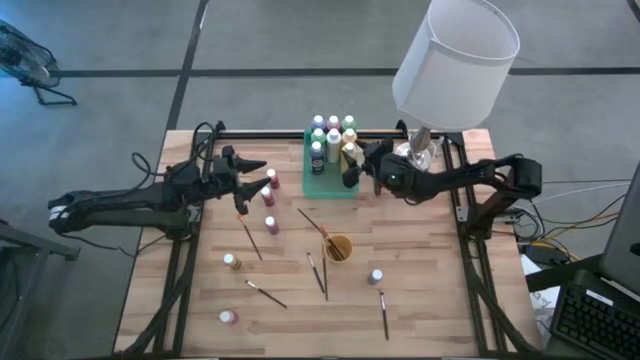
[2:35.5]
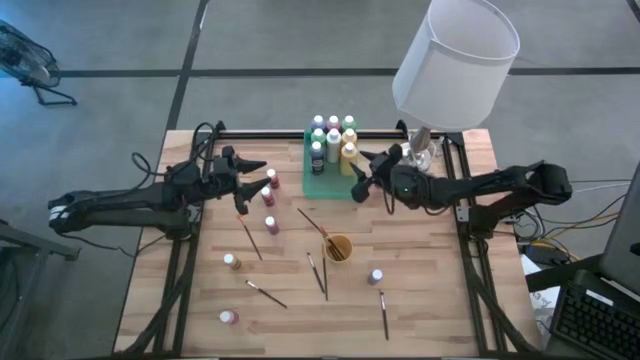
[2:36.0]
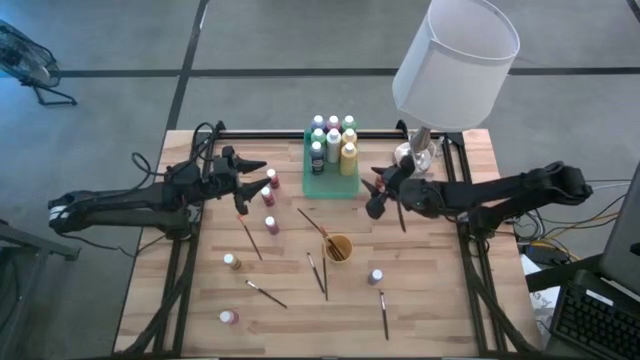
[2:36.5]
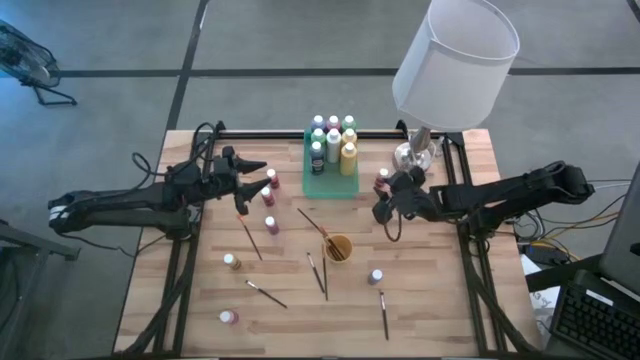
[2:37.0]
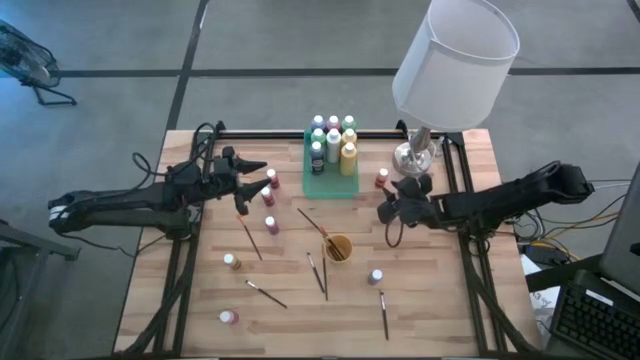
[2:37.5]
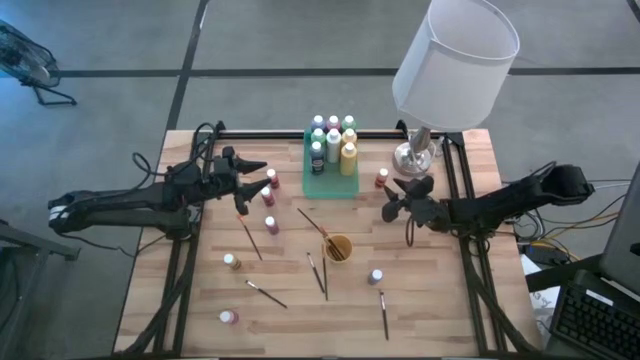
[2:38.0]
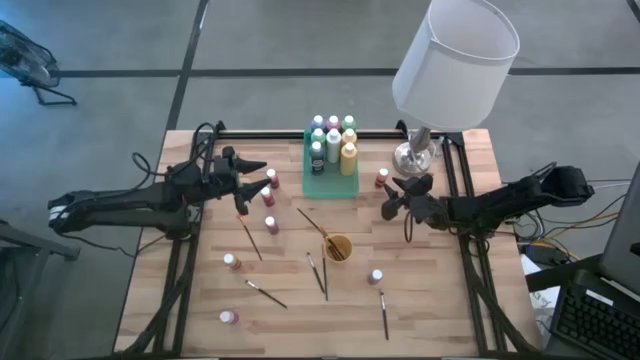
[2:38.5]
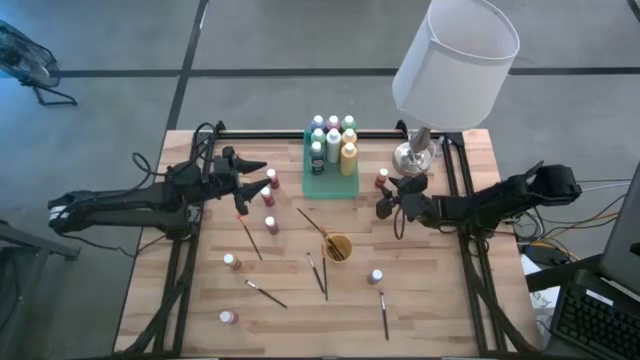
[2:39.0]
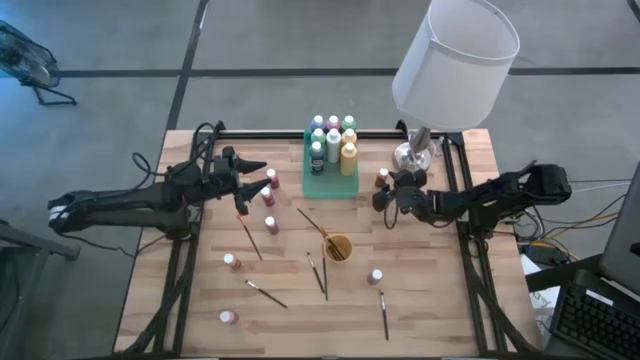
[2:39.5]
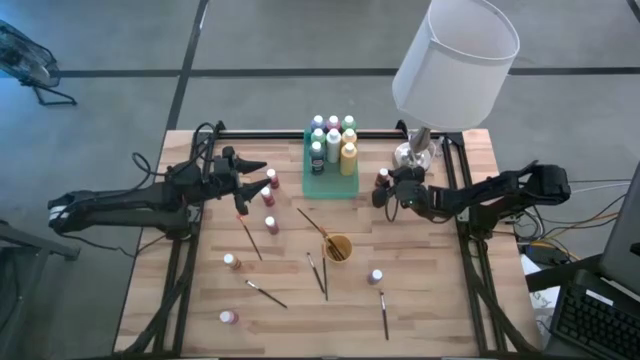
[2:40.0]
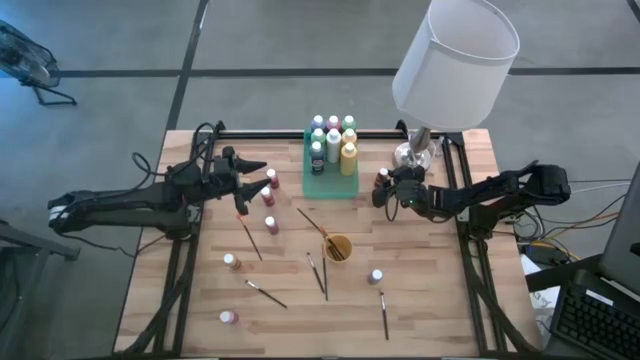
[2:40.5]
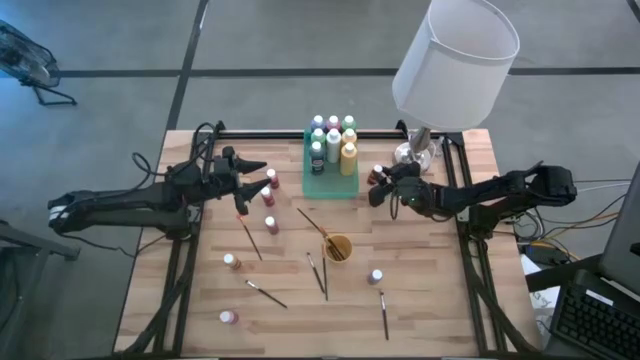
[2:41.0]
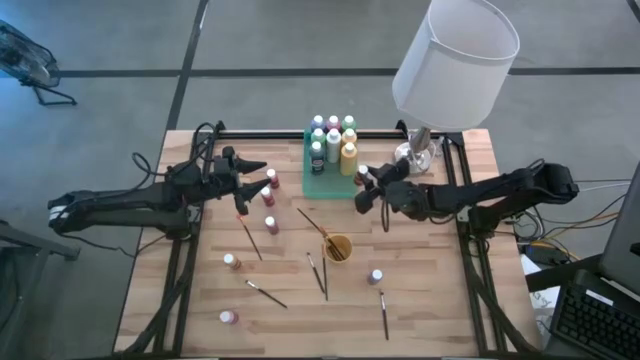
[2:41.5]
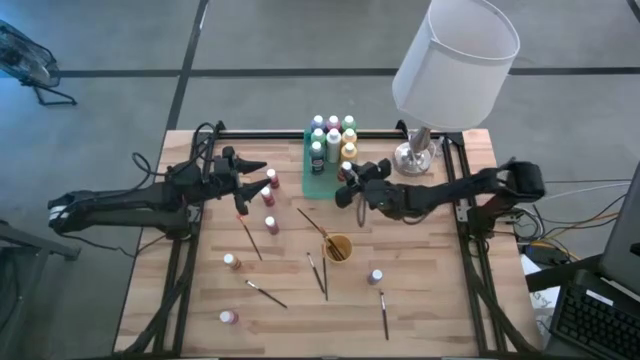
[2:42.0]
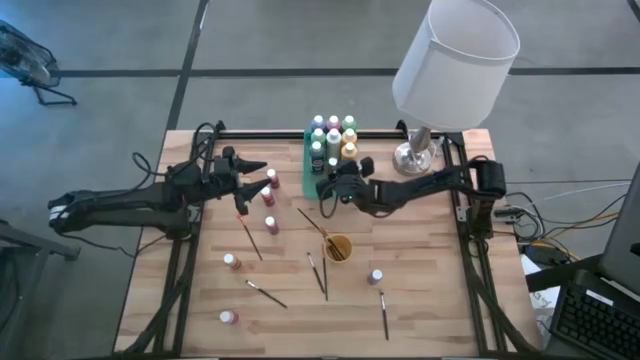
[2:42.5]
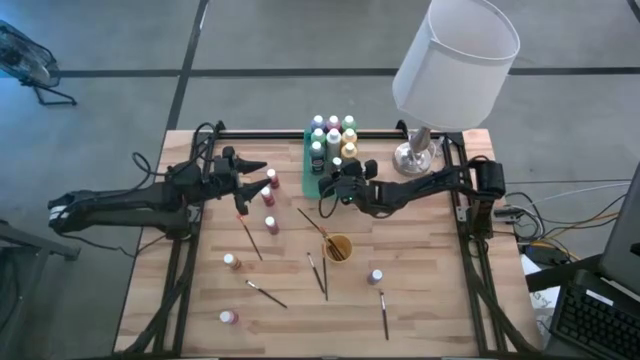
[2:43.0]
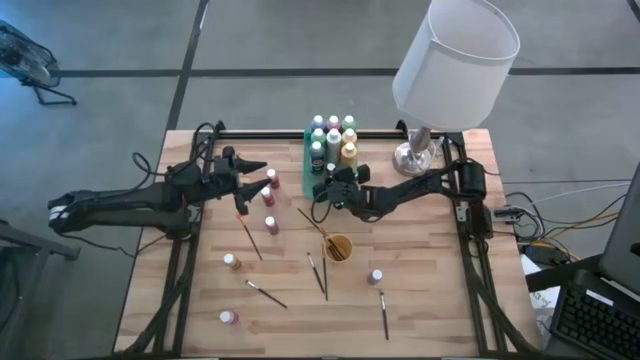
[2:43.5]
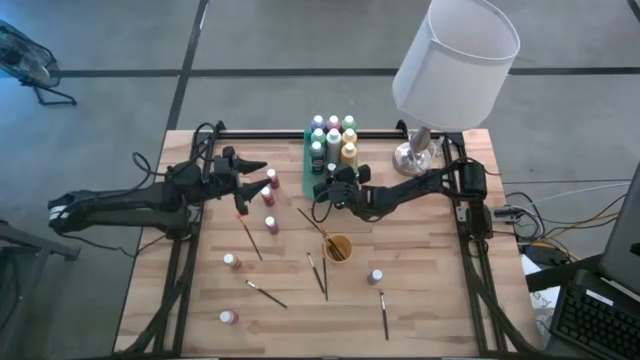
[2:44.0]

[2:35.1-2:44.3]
Task: Pick & Place Paint Supplies
Put the orange paint bottle into the green bin

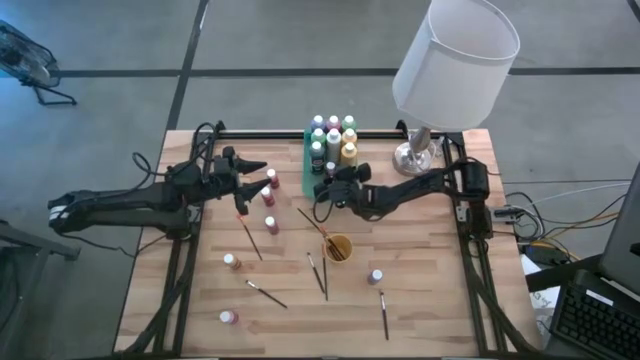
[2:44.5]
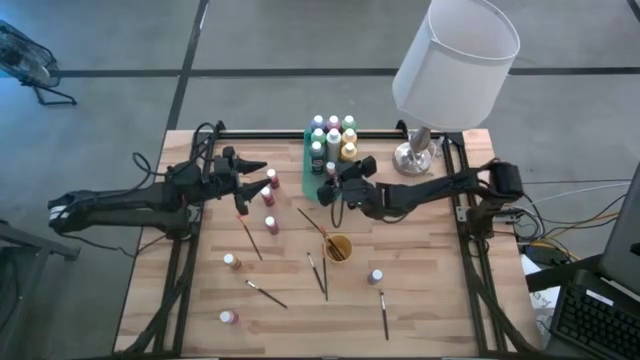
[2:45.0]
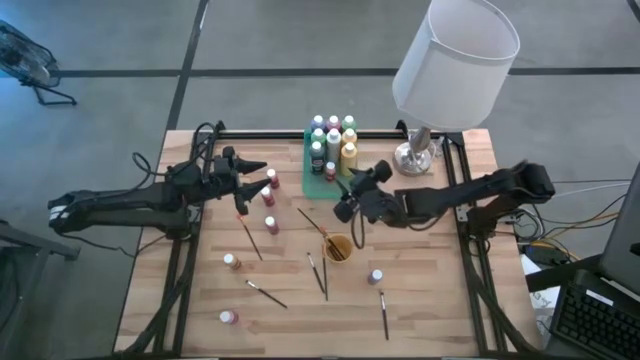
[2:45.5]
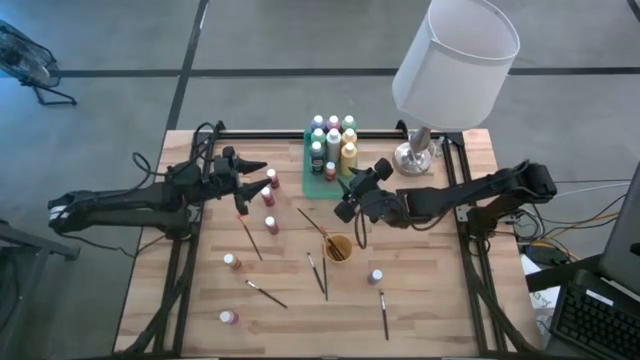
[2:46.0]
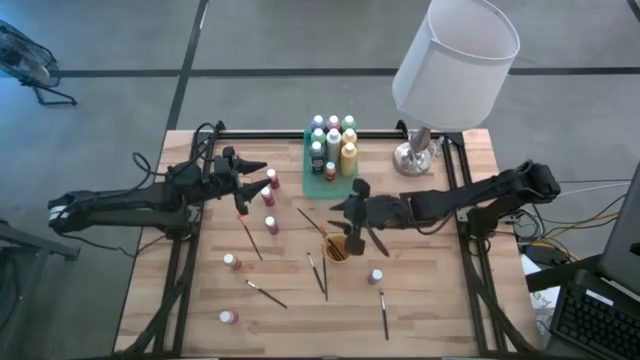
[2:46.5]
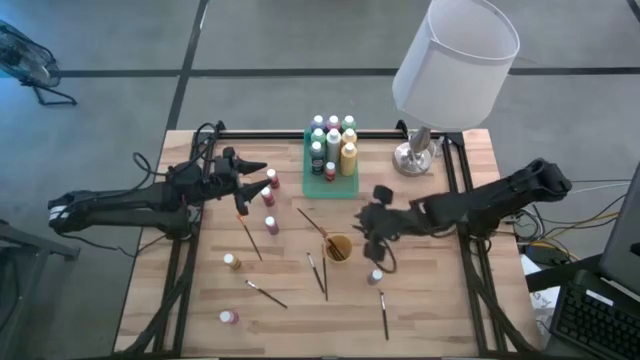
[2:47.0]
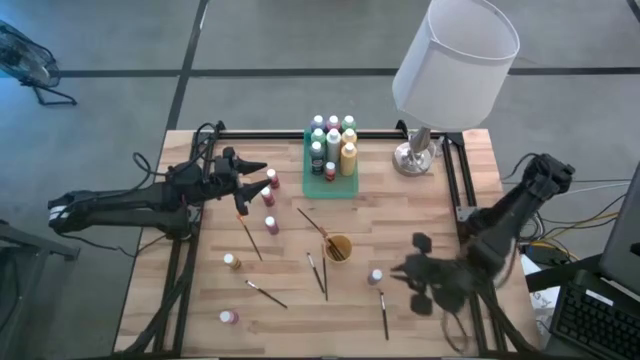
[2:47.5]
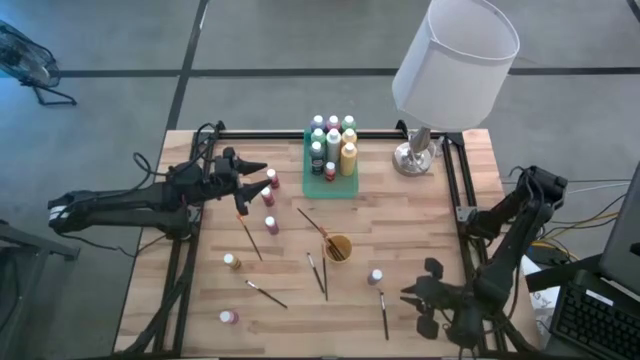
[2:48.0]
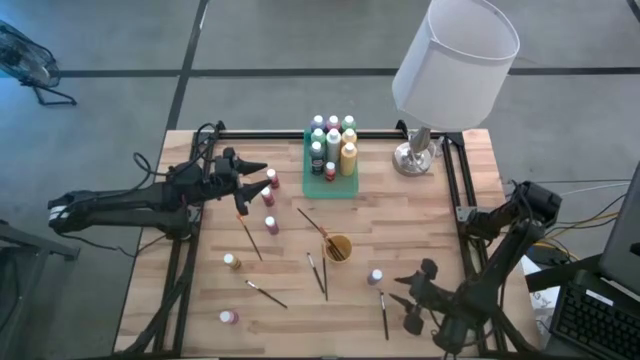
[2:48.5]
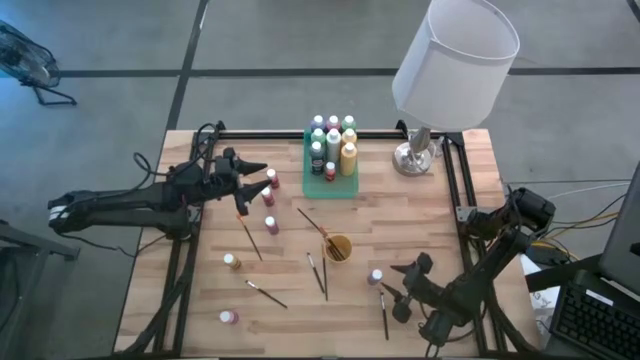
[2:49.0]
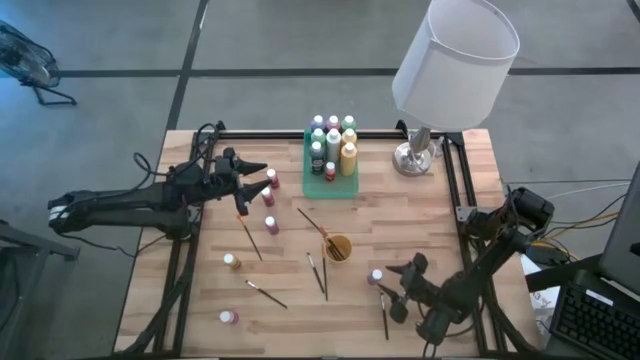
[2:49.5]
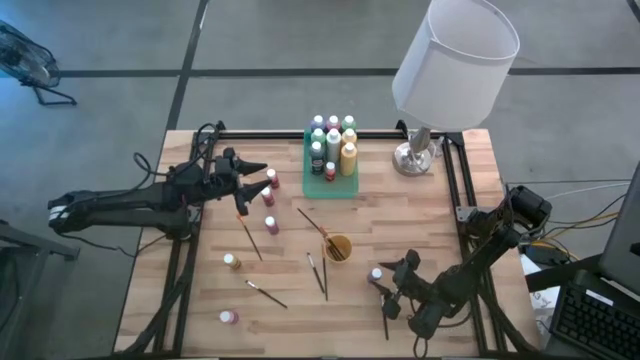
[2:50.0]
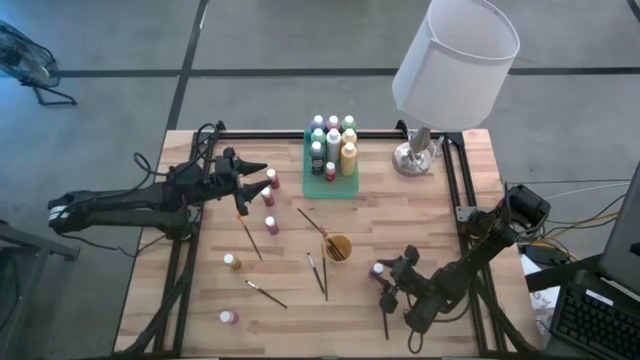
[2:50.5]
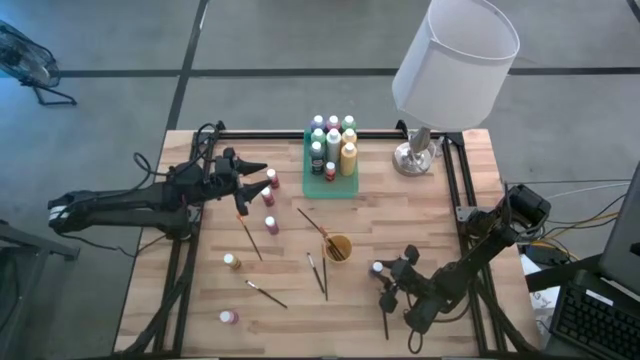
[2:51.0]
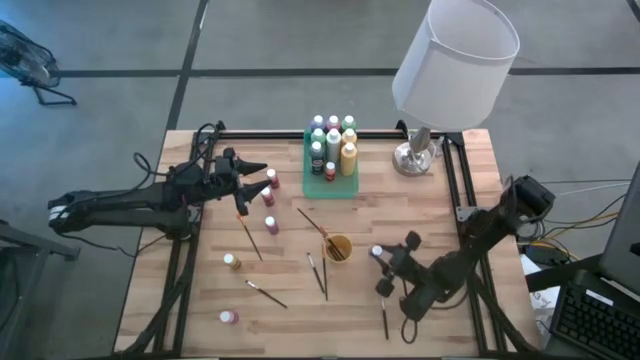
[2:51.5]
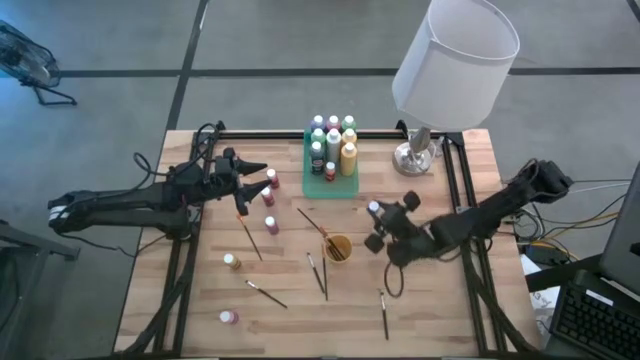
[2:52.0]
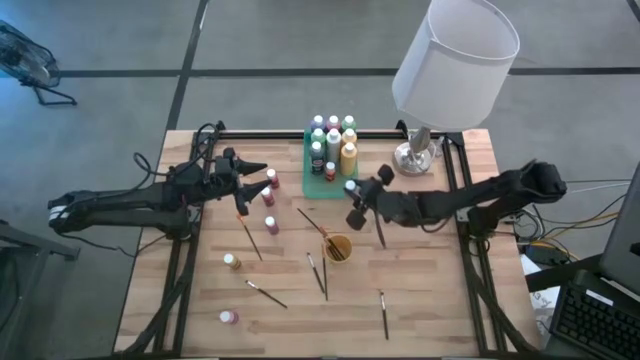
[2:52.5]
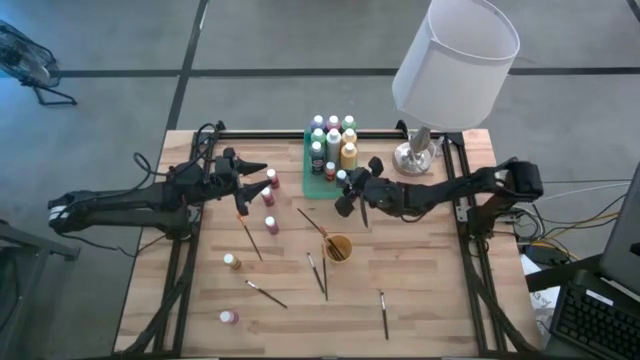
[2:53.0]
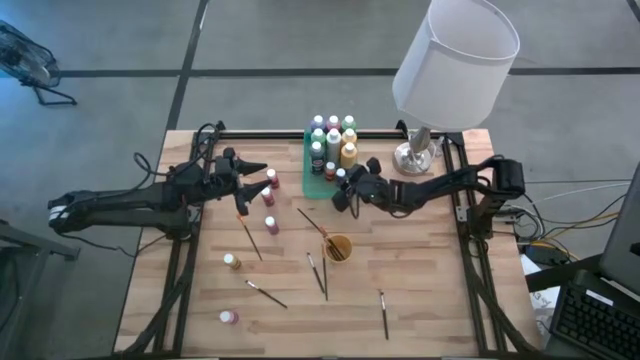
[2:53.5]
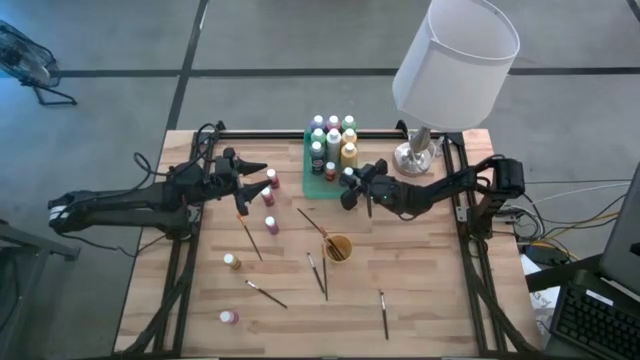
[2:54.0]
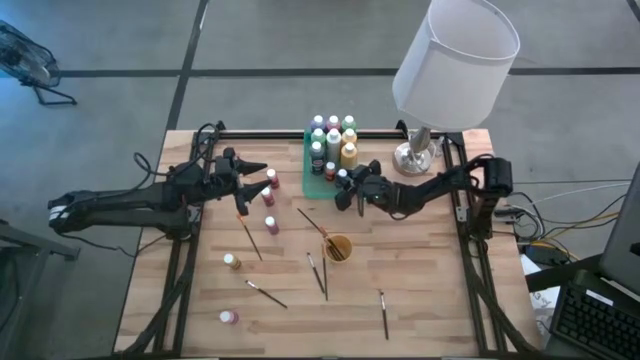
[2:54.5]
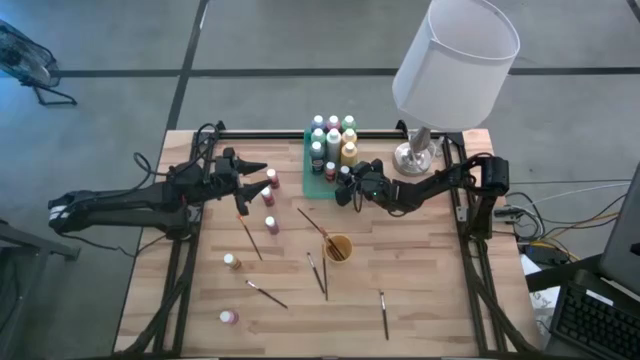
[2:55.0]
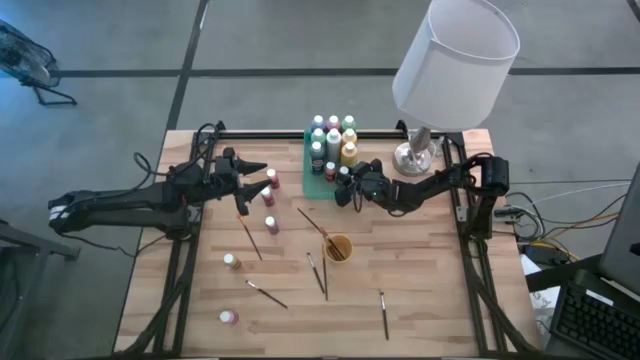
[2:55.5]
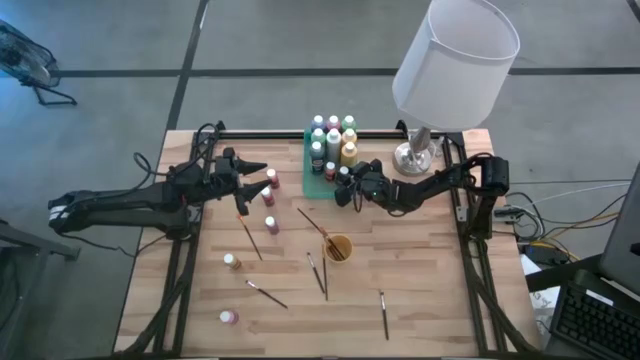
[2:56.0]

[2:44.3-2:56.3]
Put the small purple paint bottle into the green bin
